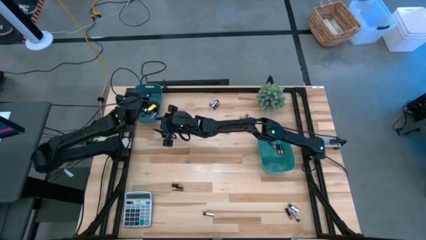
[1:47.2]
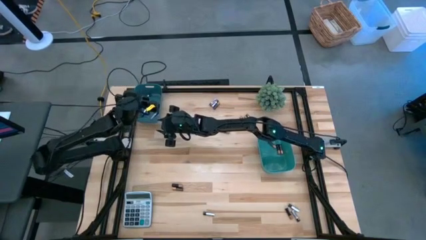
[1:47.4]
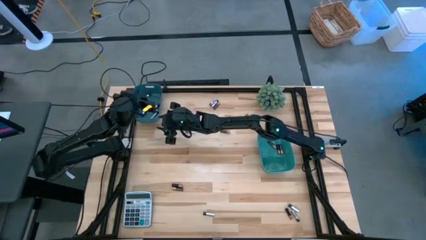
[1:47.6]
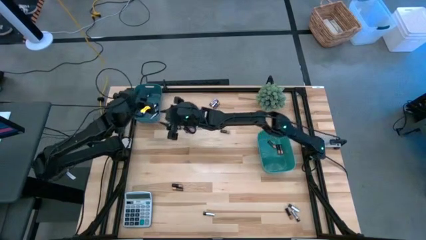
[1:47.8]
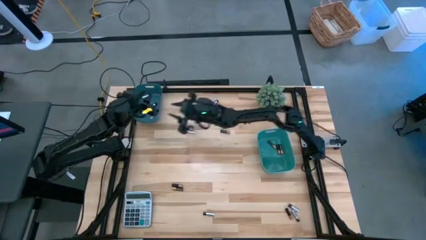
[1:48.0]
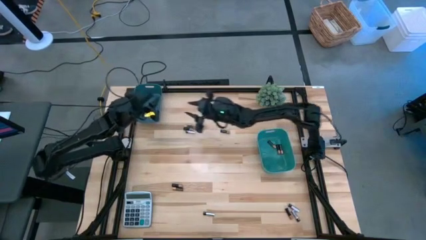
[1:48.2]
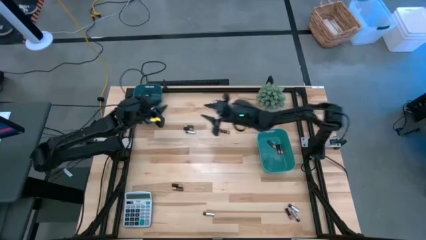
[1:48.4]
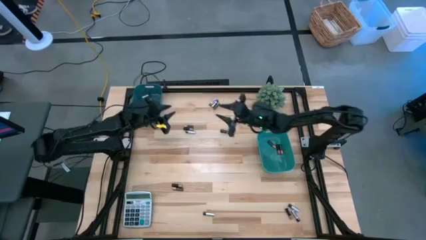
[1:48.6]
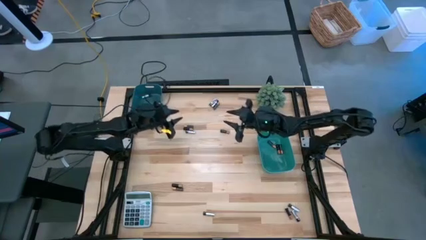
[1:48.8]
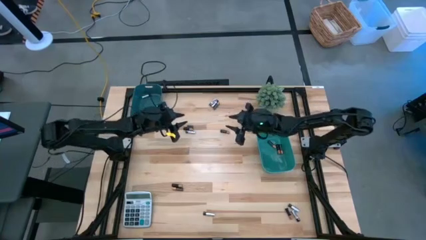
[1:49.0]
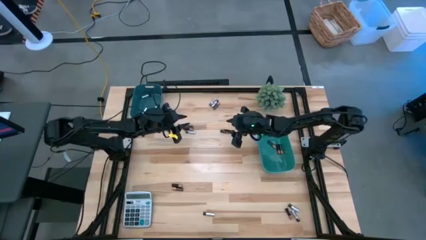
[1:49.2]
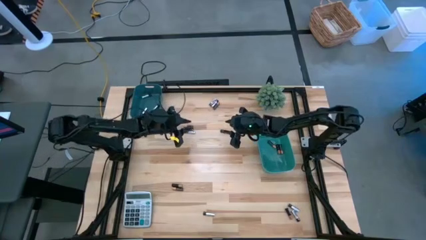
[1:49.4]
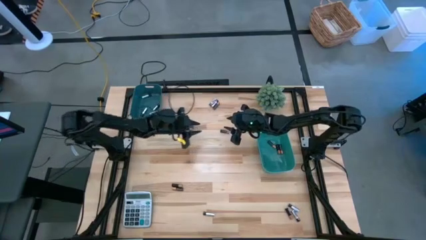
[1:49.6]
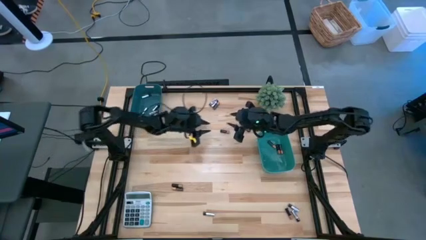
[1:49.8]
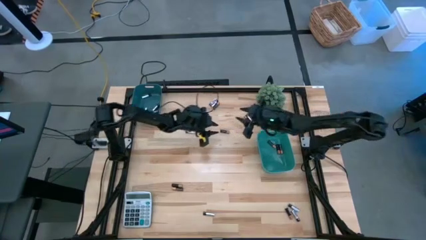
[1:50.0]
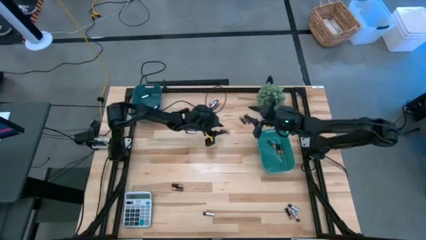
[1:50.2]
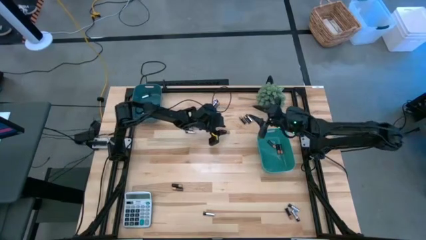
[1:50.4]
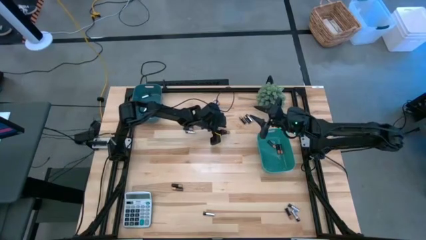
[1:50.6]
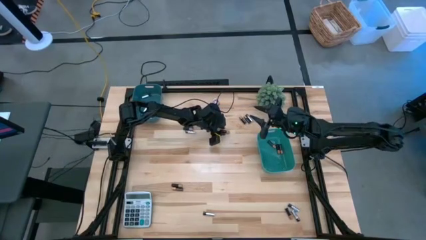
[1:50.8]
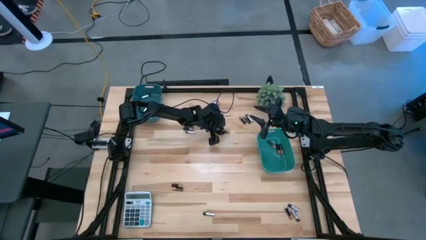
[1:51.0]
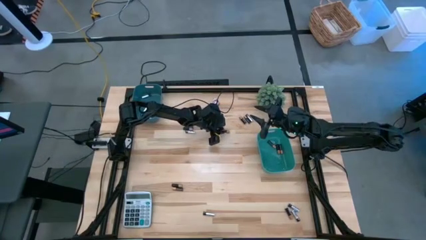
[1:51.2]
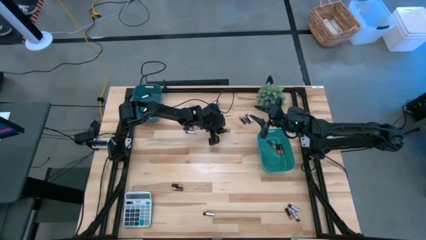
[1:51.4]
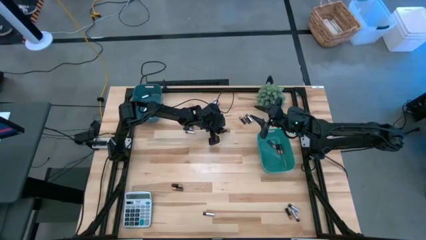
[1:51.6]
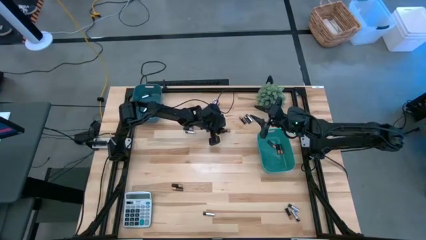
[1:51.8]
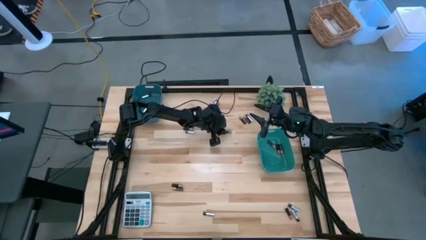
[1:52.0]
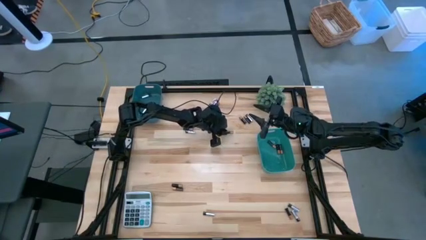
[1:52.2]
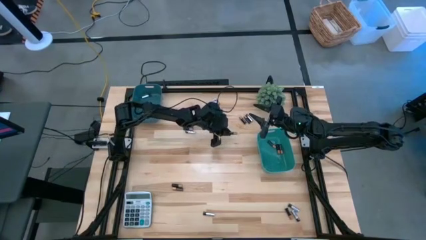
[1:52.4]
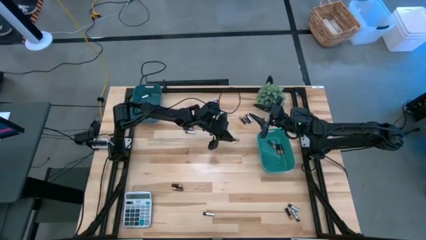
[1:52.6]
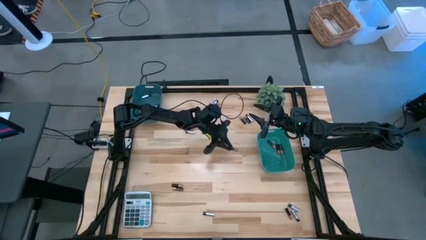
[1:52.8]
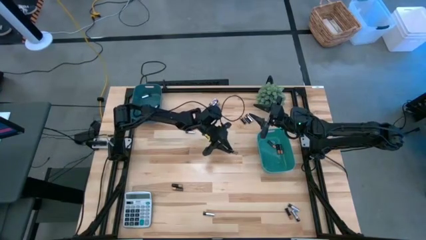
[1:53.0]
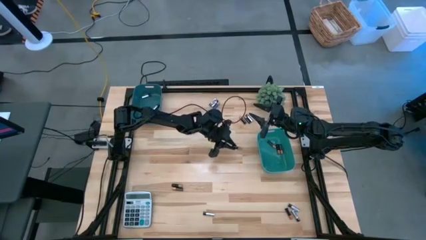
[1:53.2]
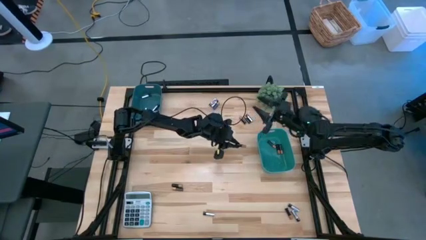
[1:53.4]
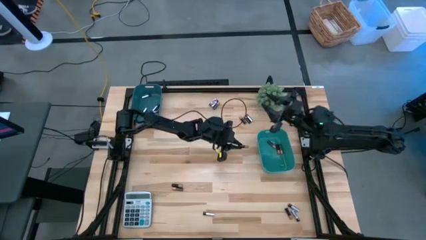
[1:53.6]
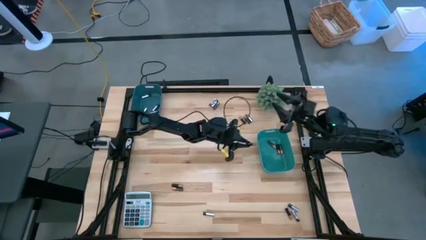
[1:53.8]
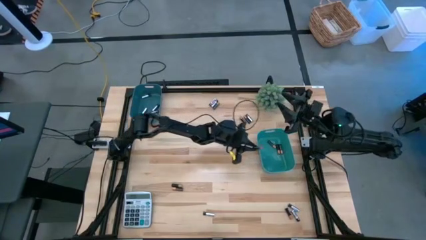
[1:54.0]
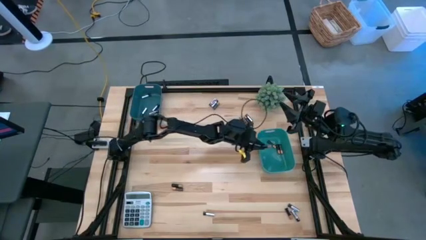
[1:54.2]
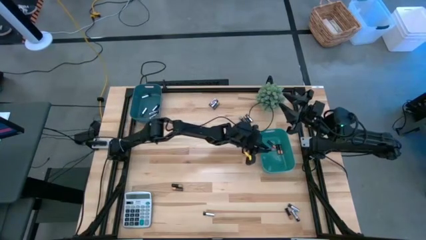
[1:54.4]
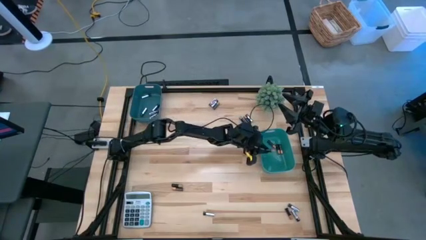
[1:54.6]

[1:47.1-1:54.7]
Task: Sort batteries
Put the brown-block battery into the green bin

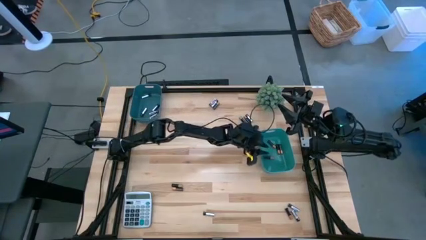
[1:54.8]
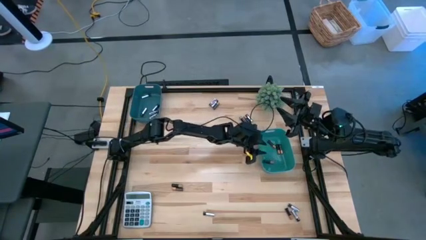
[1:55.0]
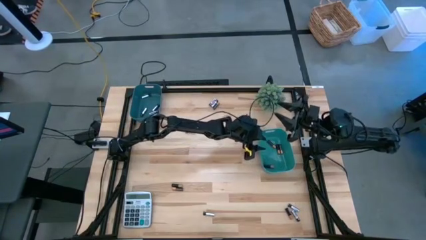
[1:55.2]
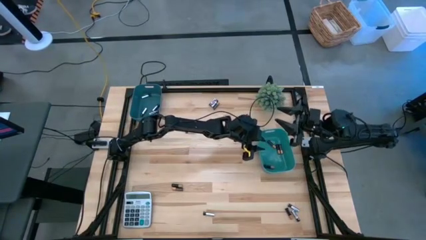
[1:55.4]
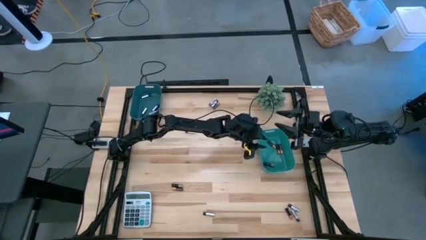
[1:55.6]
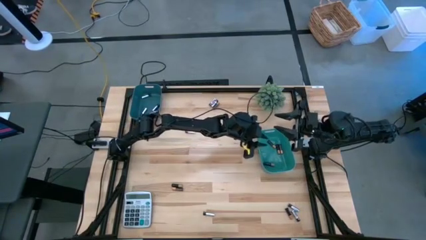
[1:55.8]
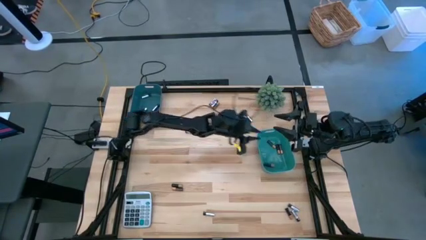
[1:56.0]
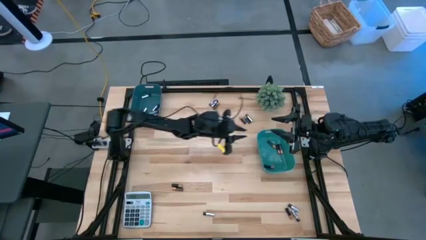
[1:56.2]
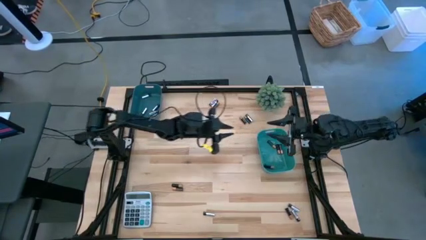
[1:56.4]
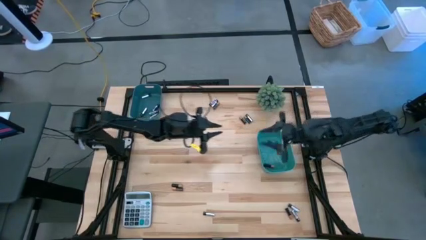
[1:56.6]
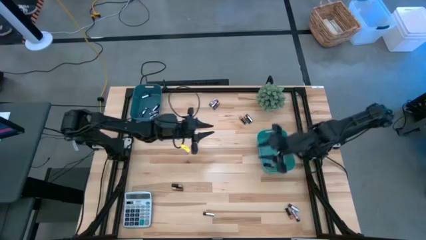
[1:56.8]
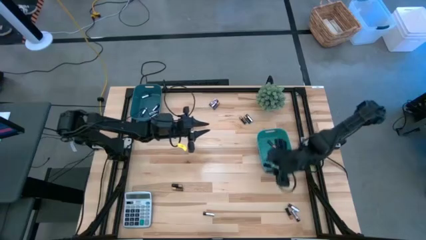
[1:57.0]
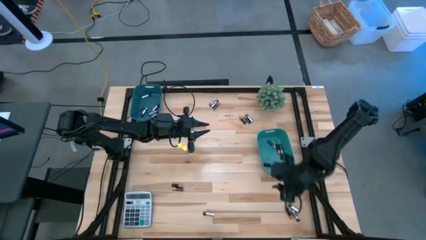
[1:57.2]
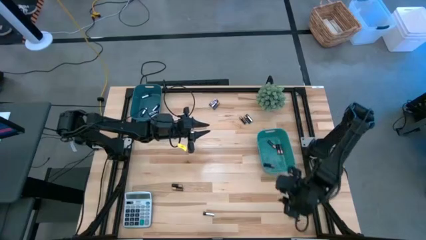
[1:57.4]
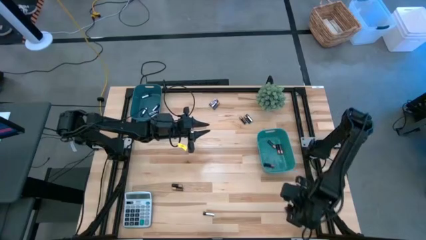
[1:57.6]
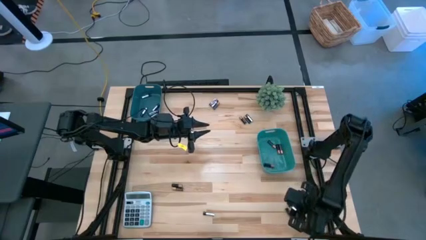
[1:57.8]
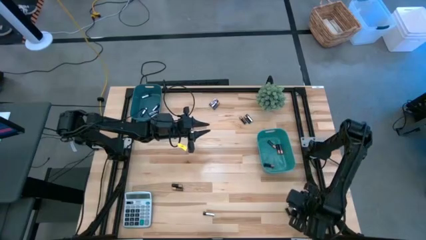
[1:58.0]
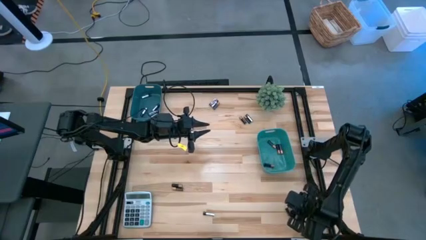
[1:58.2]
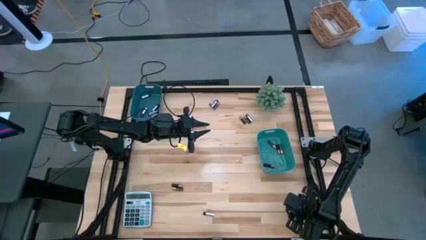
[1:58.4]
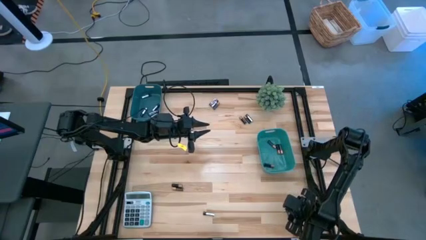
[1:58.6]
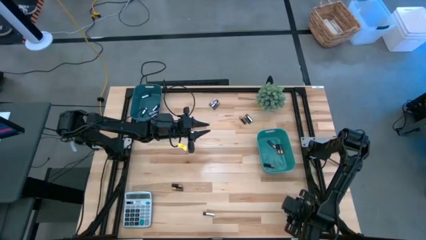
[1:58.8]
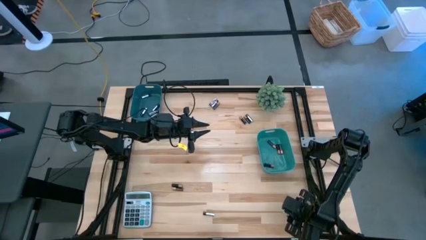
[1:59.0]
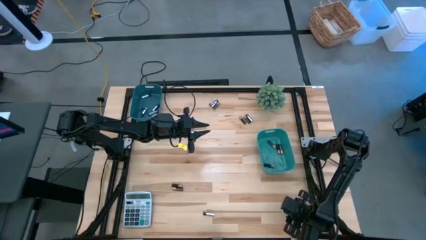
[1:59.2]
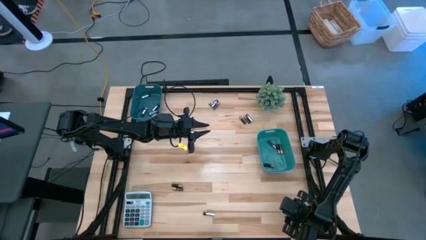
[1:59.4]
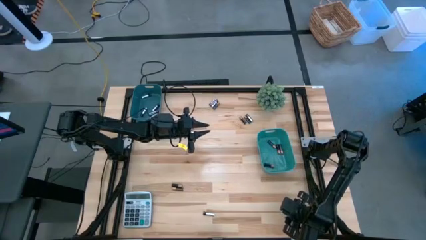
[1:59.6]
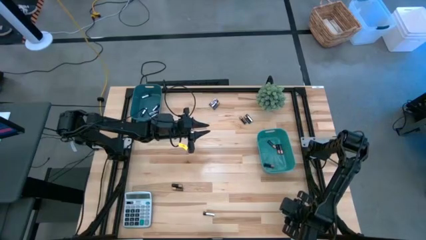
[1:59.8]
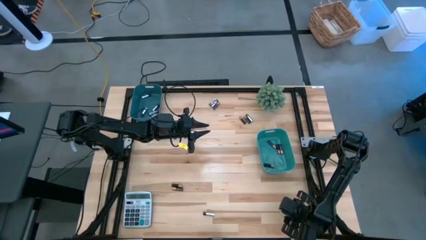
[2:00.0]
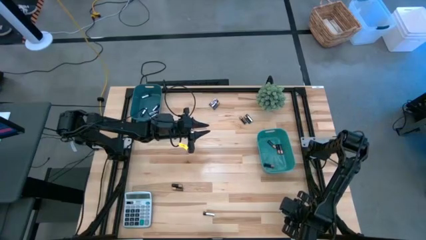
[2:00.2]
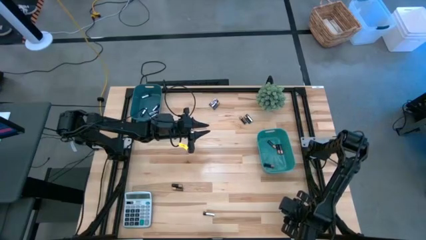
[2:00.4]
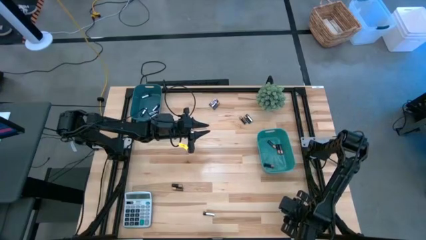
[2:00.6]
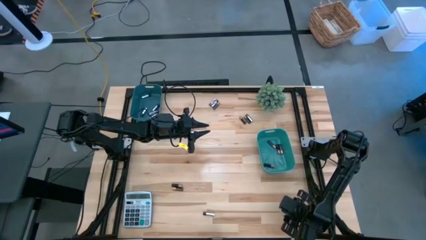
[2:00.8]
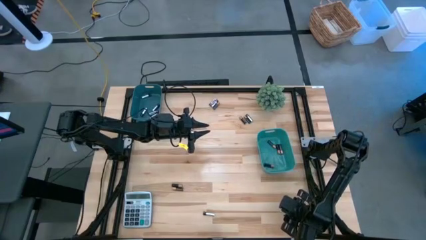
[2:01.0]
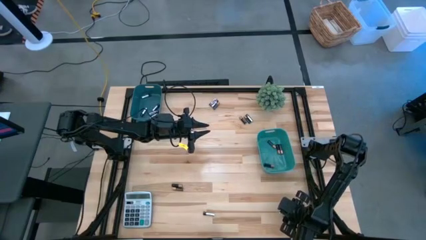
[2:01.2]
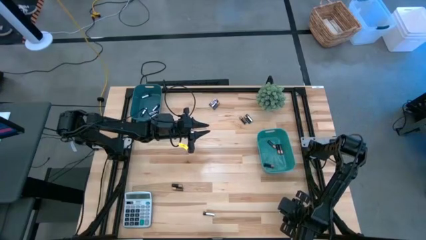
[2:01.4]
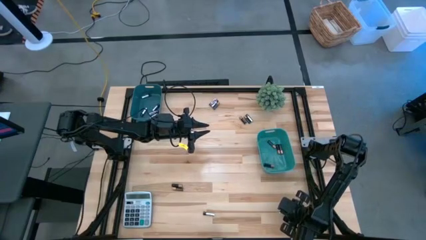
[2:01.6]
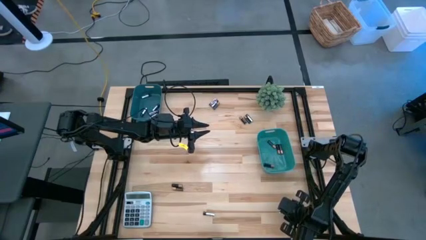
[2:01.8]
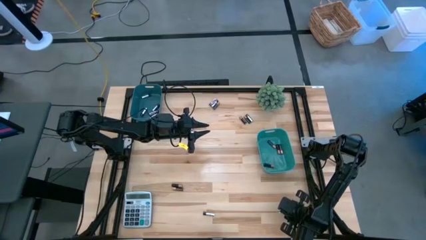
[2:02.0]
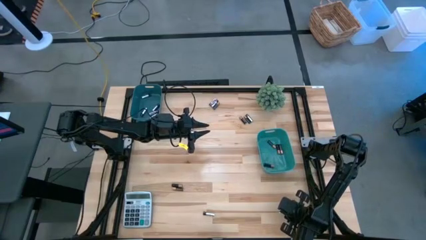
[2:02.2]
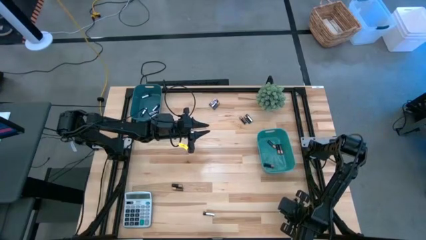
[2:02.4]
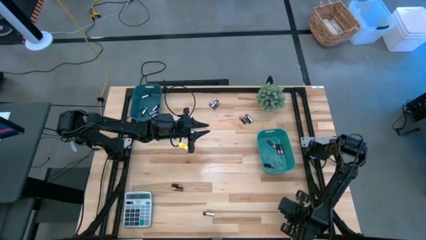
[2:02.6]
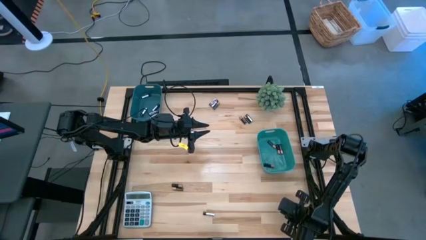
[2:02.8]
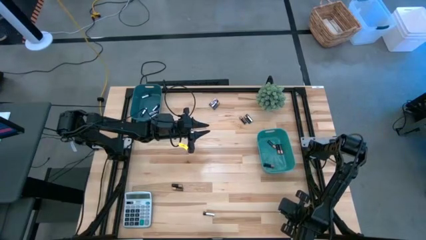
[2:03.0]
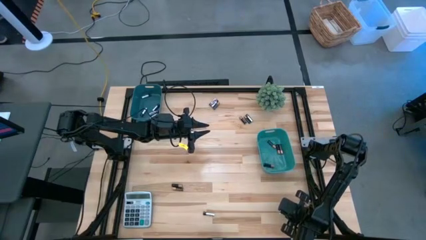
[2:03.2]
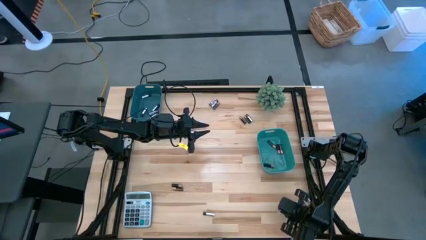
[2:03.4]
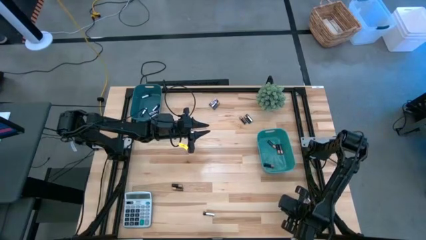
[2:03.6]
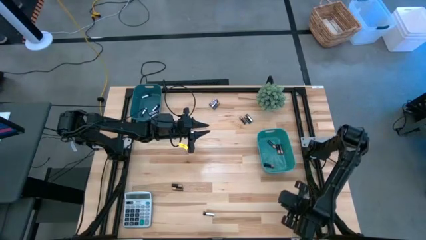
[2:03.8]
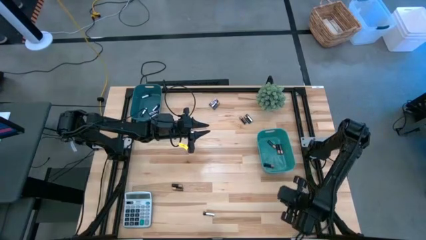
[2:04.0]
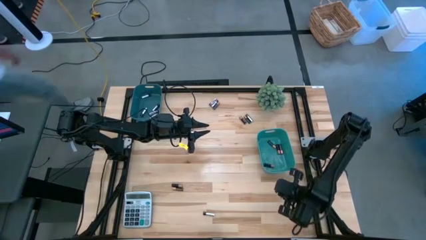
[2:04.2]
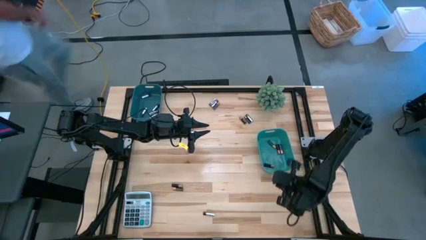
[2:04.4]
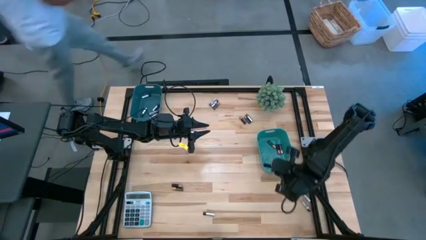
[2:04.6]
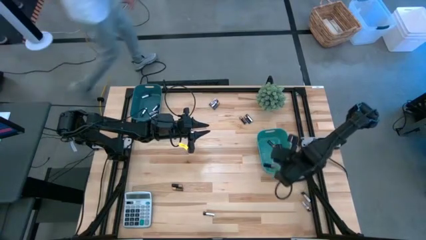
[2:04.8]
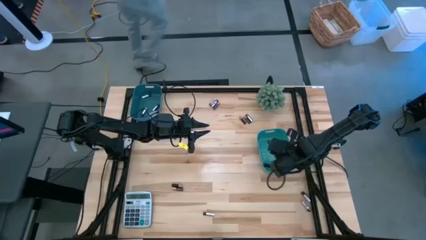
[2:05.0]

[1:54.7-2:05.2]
Put the brown-block battery into the green bin
